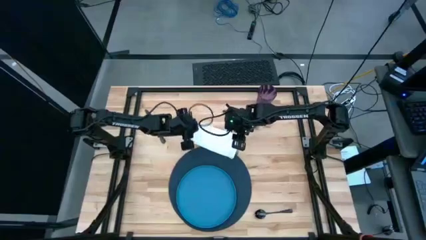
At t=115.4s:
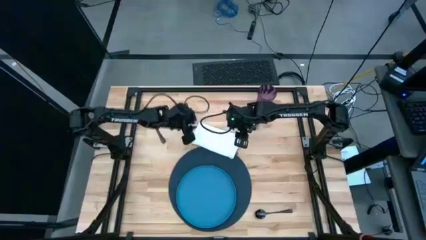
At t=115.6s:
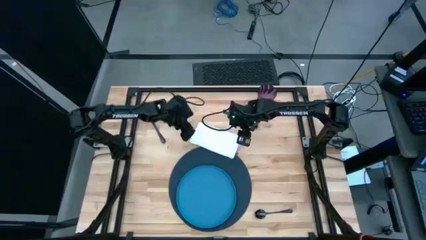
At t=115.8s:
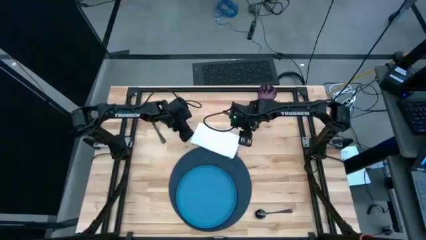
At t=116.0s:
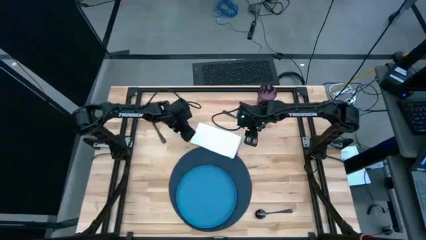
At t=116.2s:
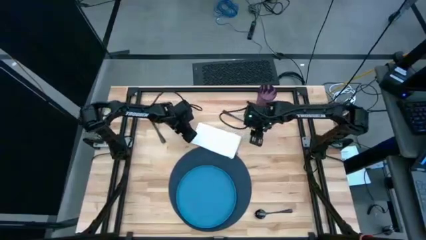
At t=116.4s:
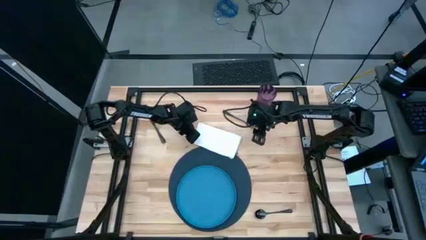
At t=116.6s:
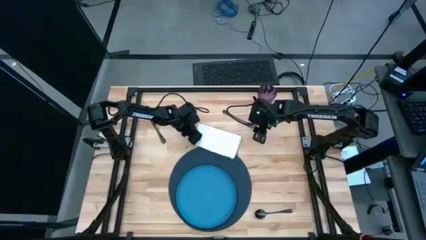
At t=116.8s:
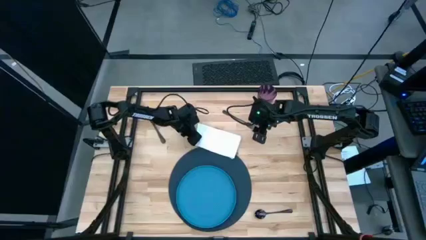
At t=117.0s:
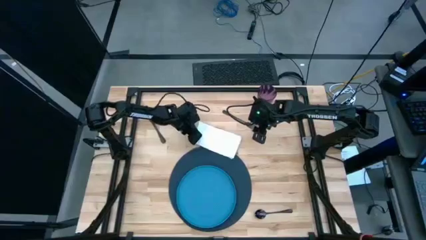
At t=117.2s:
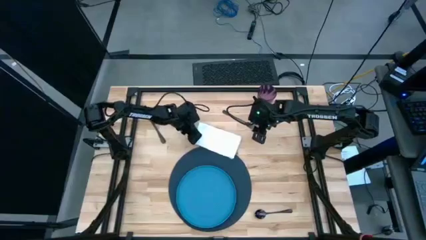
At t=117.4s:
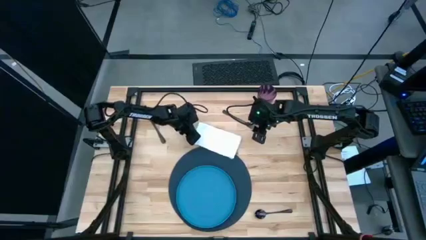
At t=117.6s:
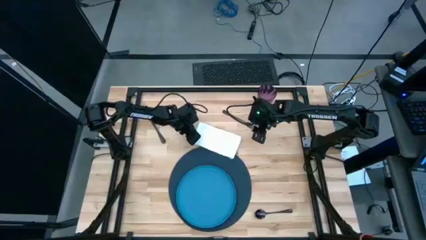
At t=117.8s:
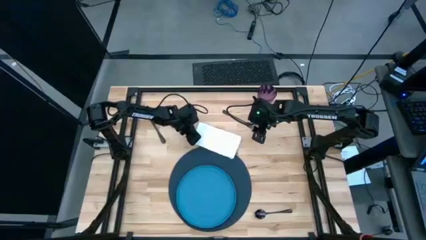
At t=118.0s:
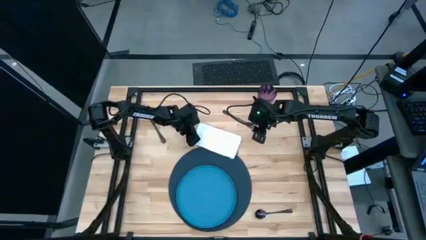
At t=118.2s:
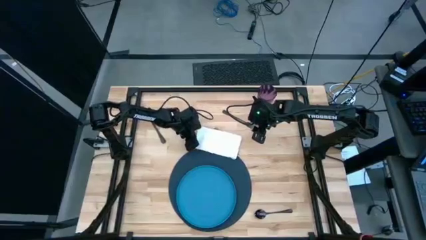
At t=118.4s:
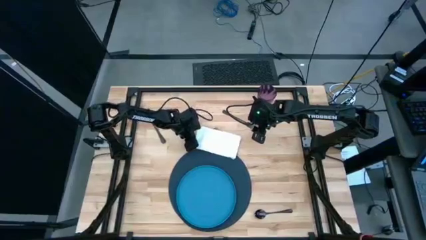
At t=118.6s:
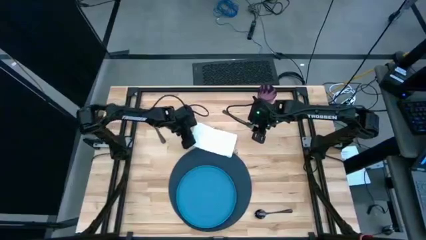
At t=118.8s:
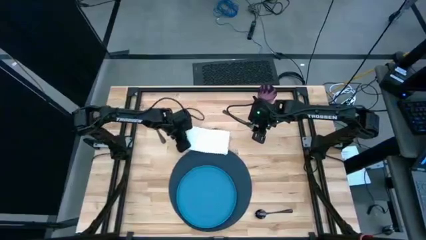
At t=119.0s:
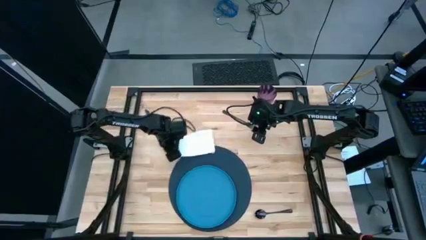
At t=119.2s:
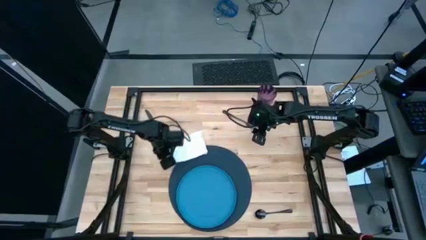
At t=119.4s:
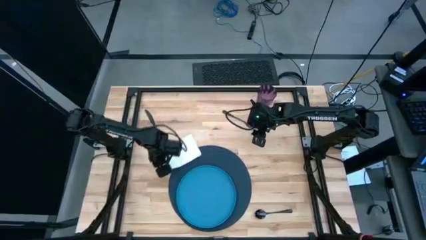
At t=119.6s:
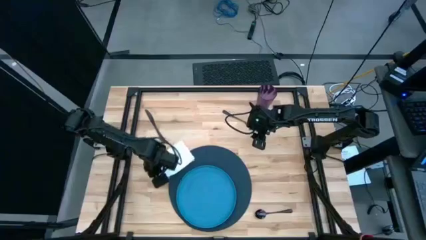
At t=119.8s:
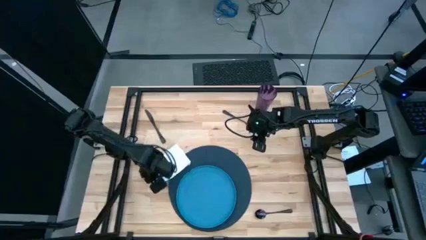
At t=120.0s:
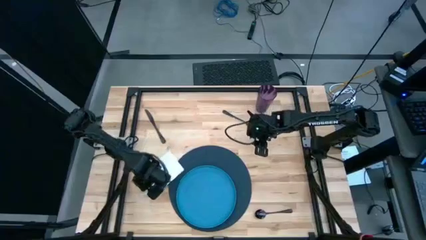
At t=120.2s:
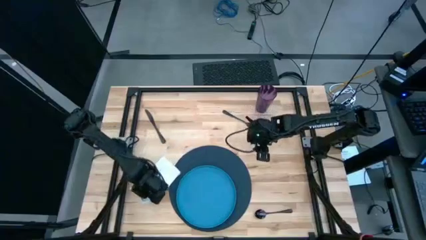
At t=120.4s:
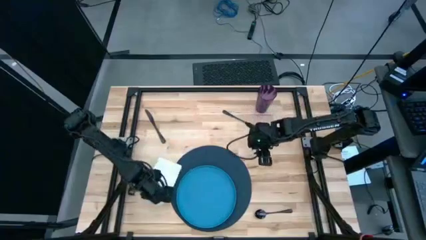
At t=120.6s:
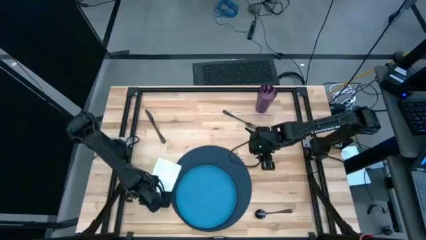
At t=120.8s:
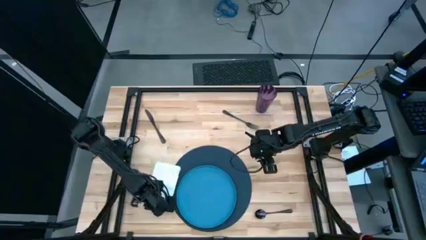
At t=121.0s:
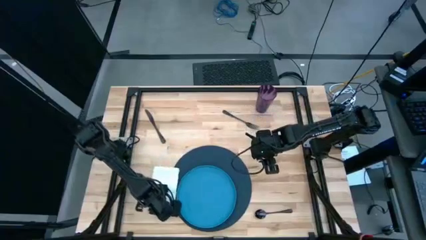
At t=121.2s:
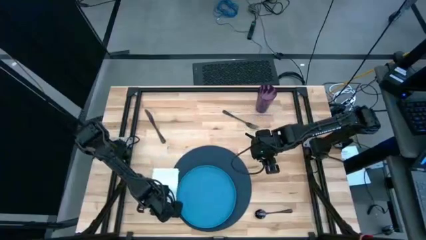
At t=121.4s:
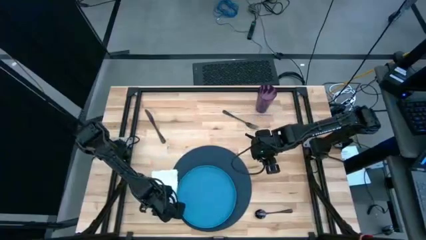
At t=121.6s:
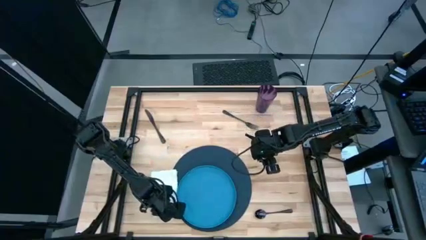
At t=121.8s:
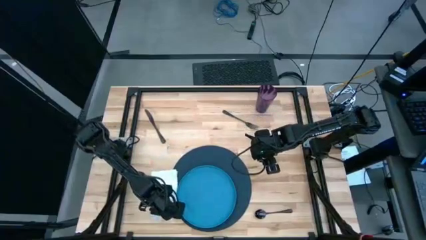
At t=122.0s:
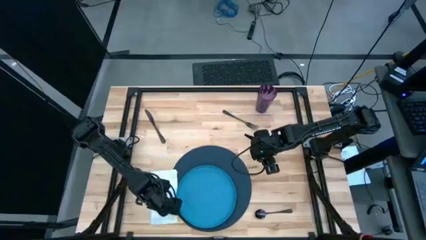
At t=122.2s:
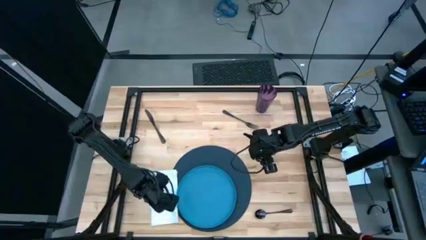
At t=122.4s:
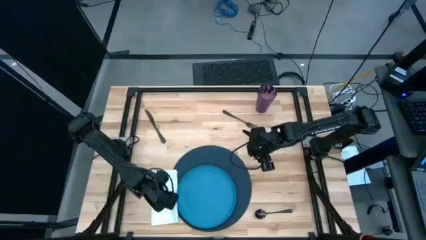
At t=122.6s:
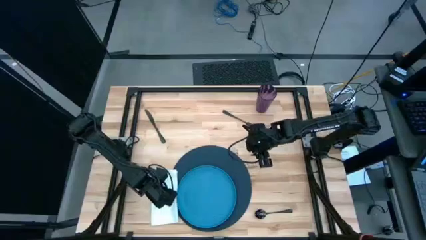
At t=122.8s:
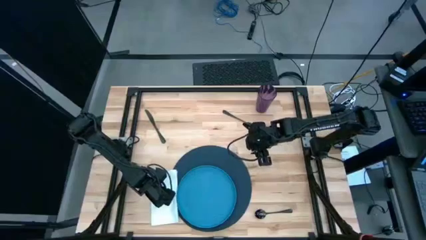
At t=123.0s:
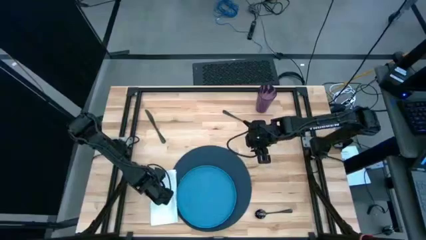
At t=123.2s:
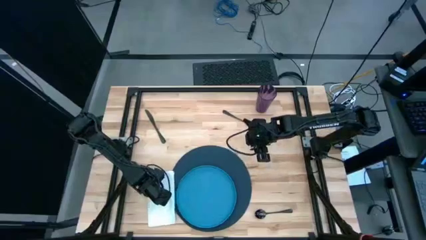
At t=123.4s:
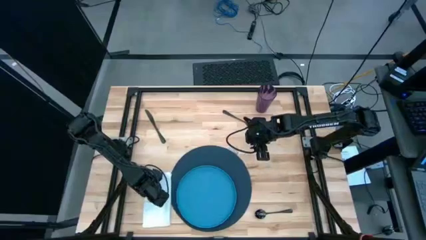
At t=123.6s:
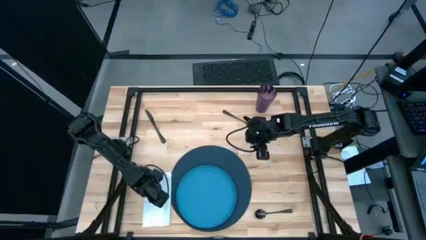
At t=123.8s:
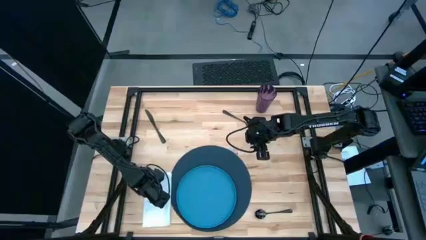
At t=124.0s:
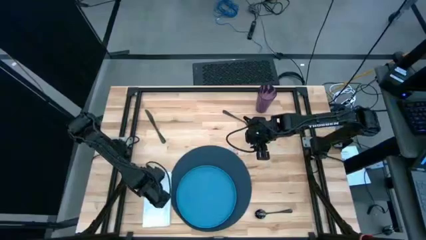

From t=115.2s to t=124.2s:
Task: Set table place
Move the white napkin beside the dark blue placemat

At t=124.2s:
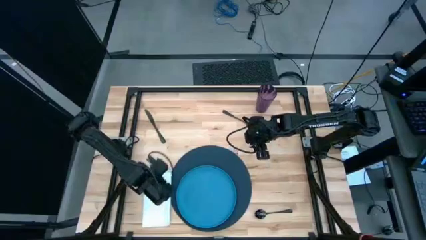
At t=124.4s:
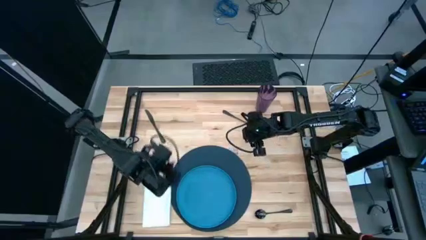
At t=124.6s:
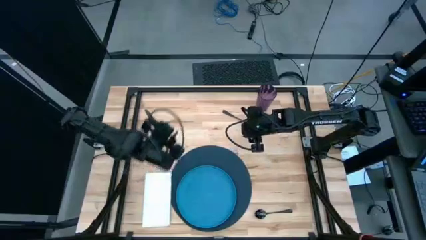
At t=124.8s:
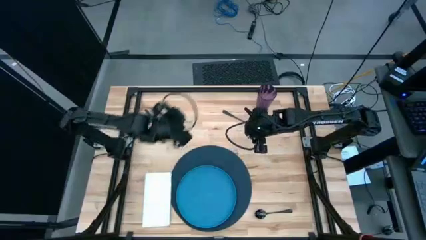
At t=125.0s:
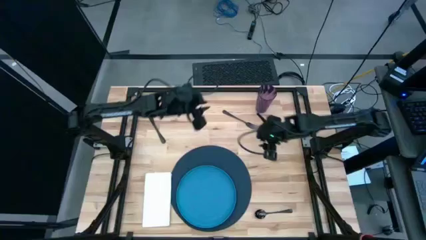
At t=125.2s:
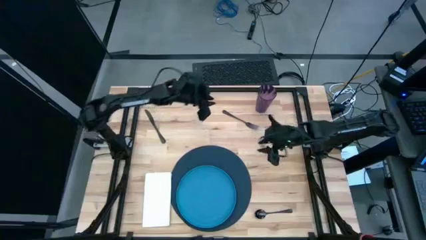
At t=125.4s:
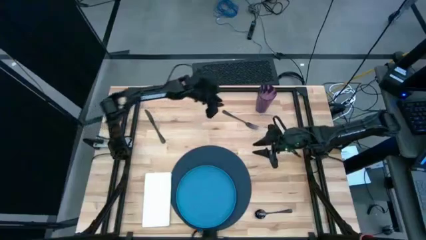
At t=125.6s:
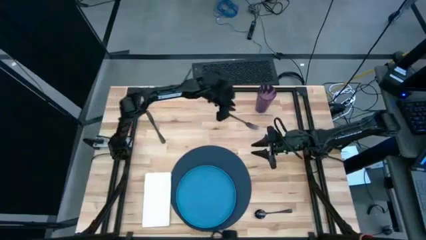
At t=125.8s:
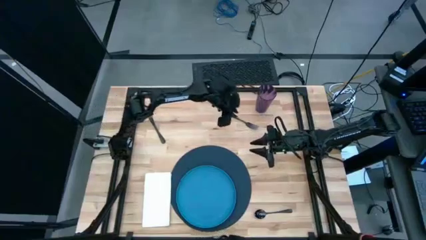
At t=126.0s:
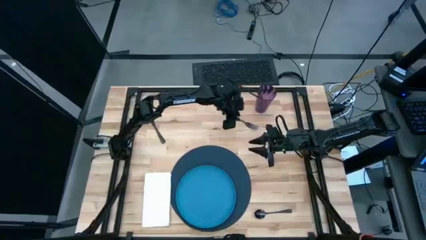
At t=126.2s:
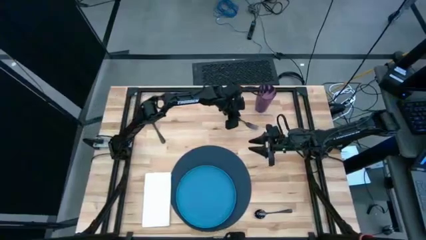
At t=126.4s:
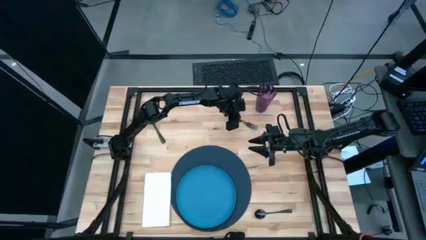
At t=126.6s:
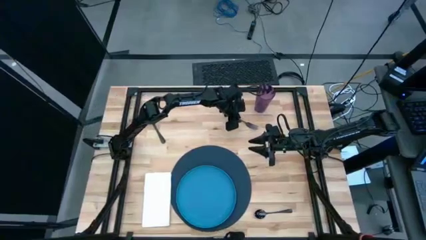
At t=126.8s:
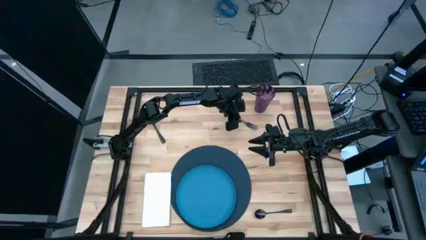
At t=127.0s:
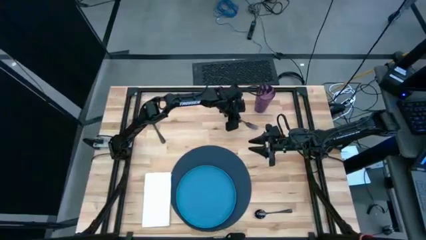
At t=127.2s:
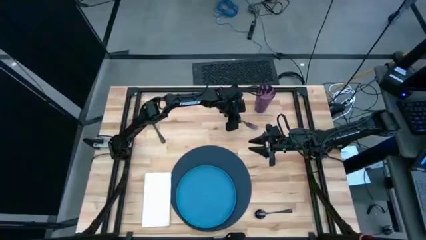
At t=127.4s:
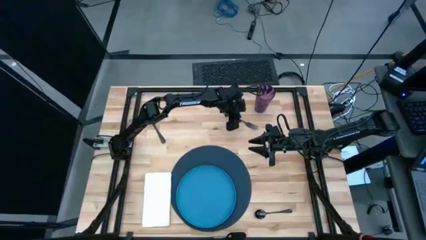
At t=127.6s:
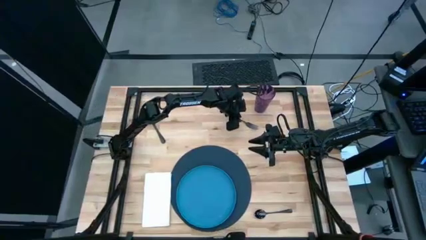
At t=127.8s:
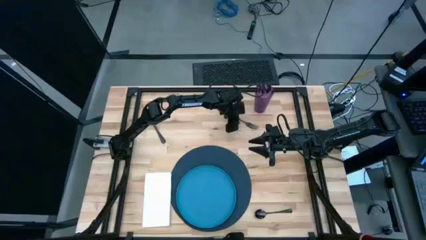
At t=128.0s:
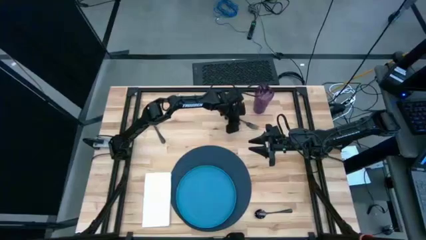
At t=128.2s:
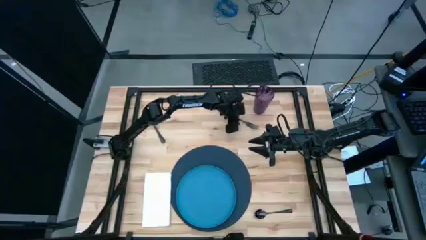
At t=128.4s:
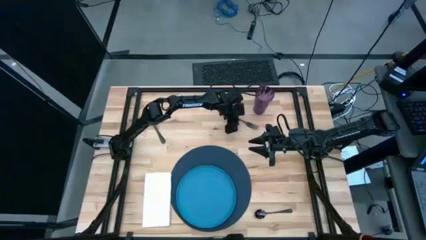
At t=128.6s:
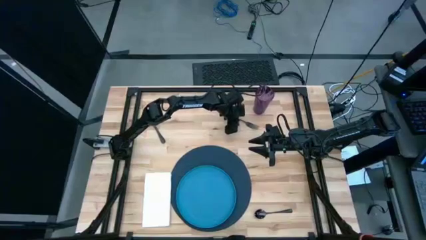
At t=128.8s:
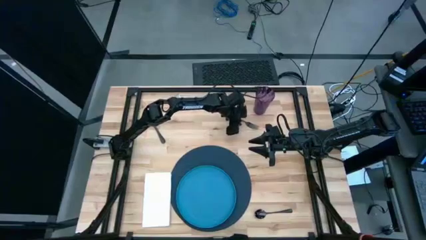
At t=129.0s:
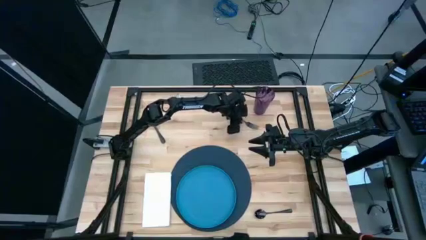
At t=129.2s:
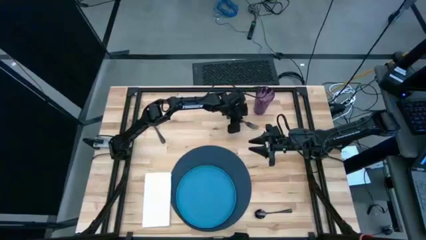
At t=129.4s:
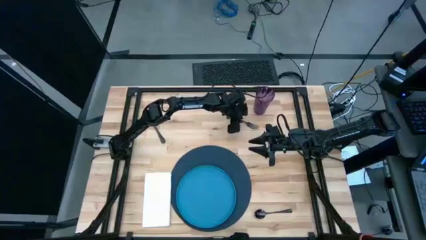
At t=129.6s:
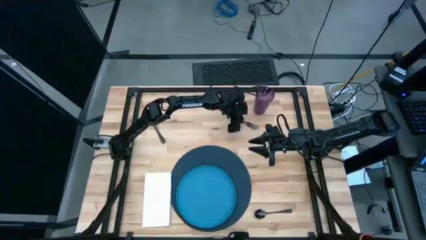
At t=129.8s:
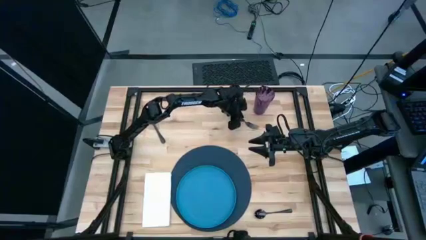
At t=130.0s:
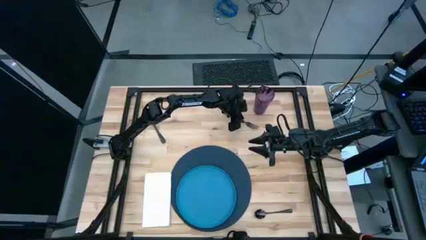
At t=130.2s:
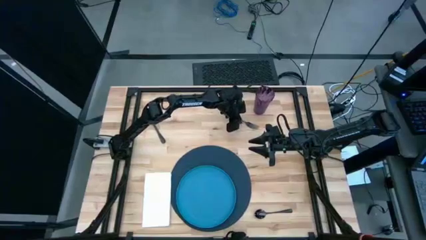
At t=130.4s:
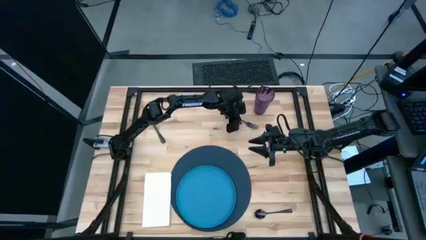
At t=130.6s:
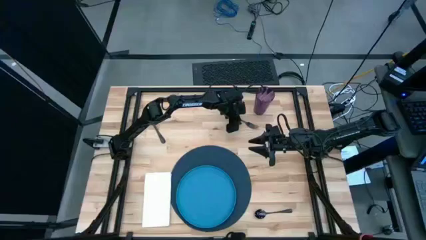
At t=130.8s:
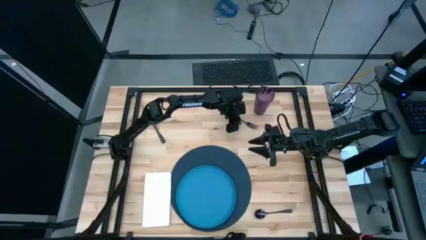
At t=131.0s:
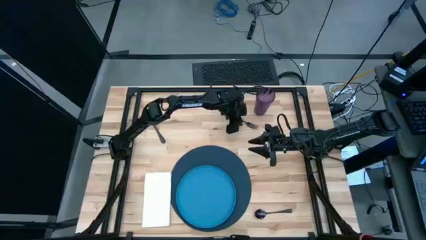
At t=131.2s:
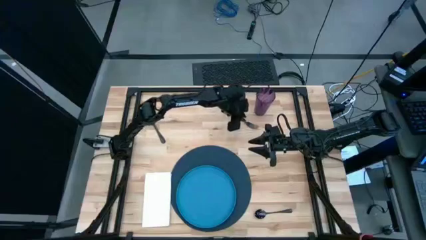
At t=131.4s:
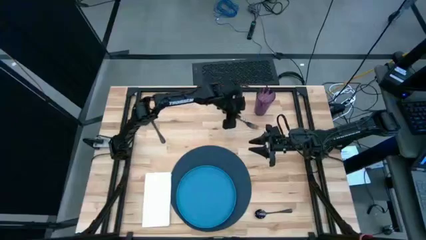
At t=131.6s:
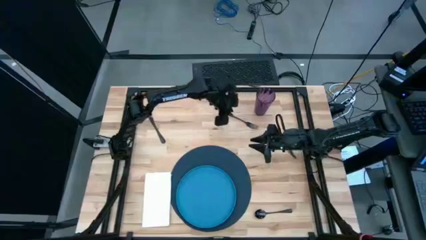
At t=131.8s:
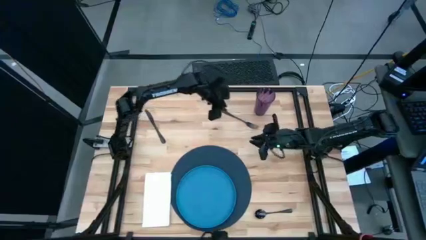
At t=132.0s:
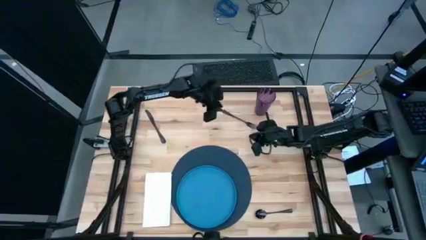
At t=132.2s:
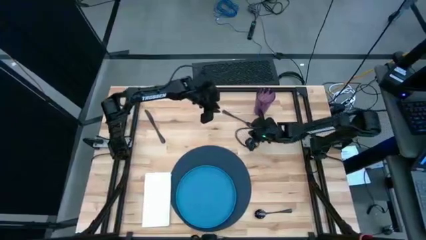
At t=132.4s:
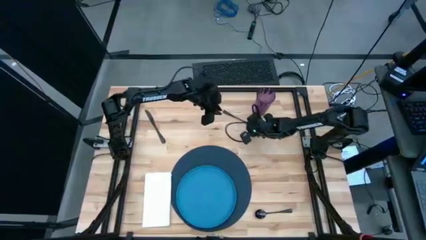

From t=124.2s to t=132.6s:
Put the black fork on the white napkin
